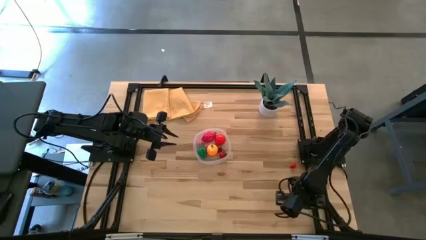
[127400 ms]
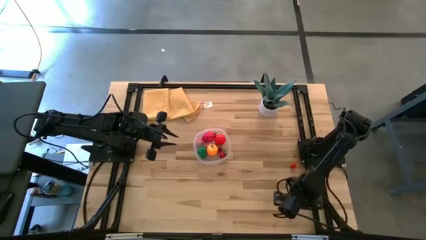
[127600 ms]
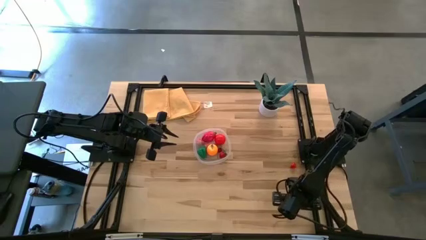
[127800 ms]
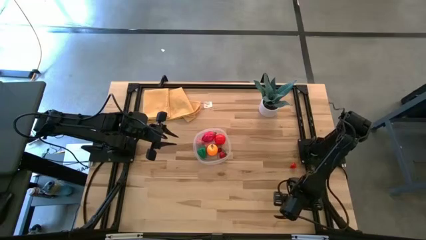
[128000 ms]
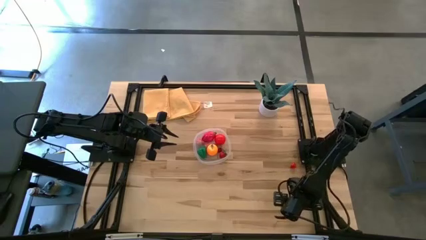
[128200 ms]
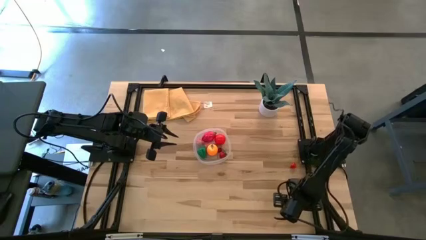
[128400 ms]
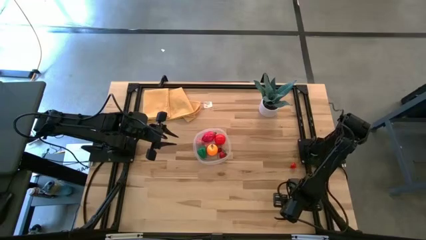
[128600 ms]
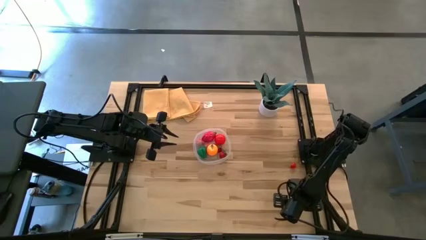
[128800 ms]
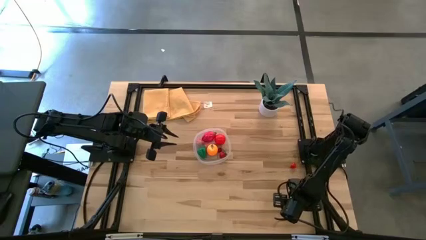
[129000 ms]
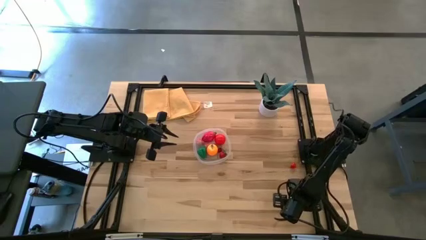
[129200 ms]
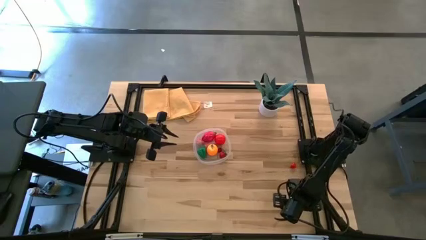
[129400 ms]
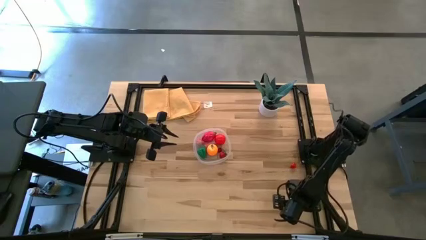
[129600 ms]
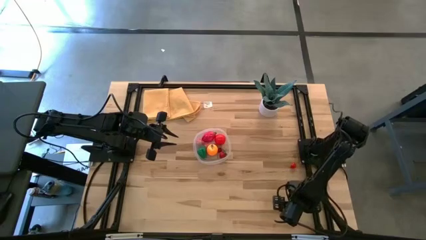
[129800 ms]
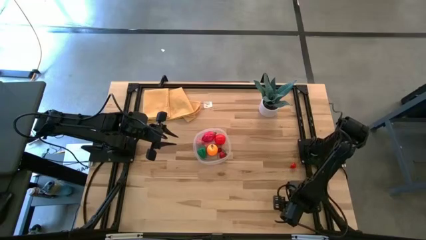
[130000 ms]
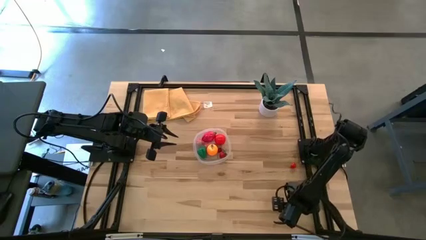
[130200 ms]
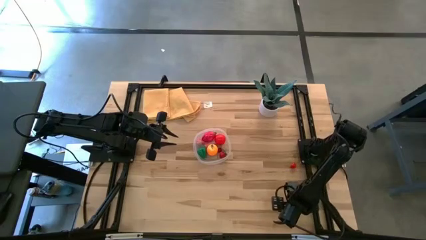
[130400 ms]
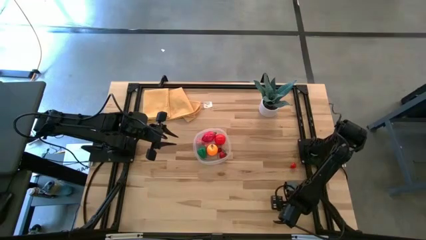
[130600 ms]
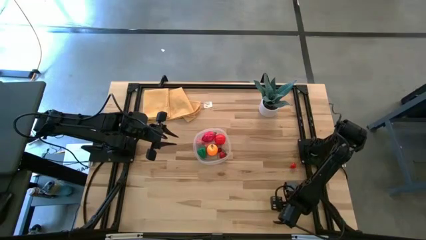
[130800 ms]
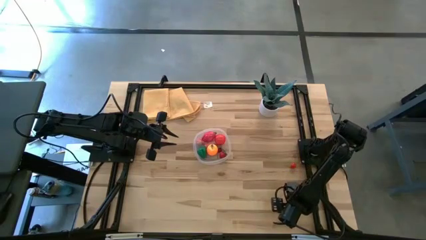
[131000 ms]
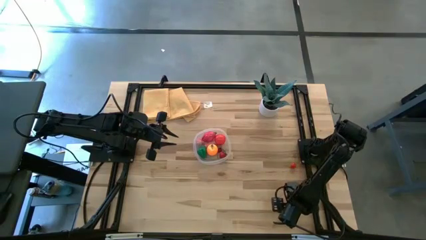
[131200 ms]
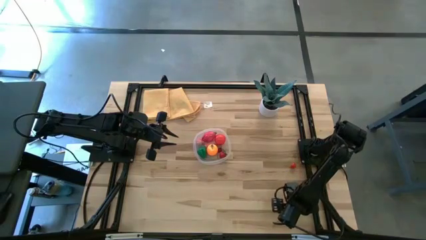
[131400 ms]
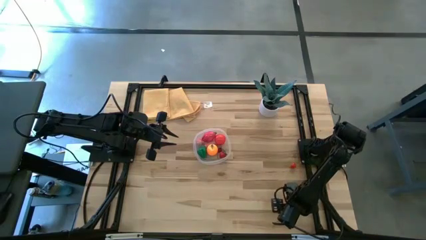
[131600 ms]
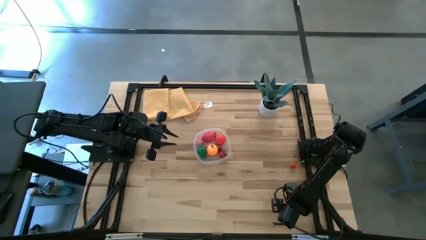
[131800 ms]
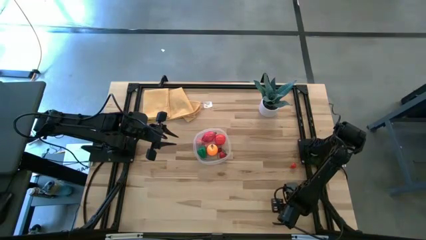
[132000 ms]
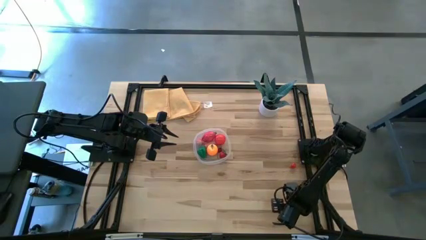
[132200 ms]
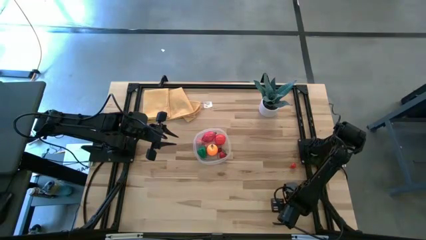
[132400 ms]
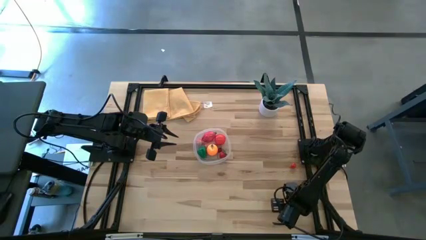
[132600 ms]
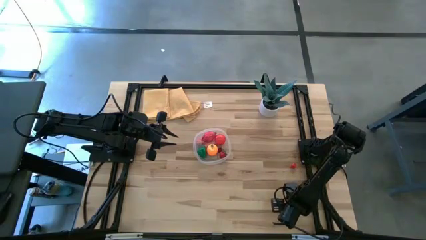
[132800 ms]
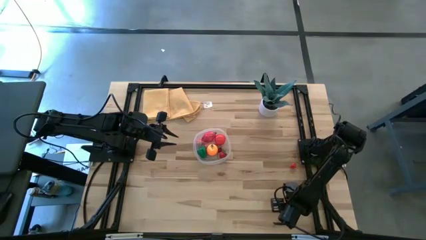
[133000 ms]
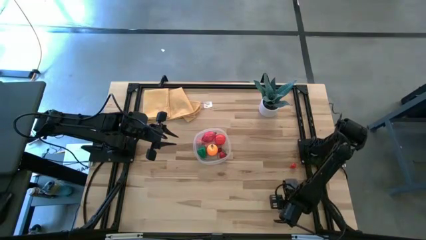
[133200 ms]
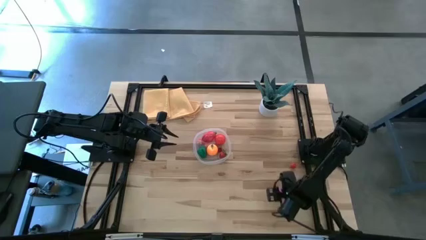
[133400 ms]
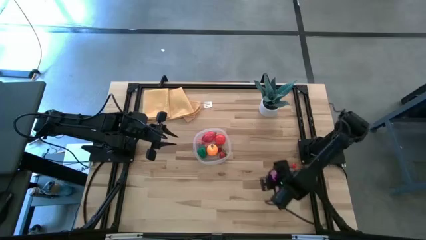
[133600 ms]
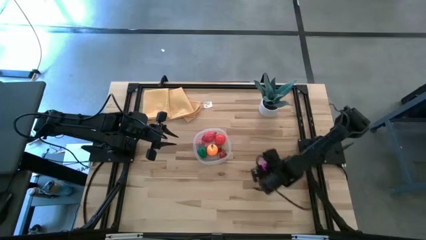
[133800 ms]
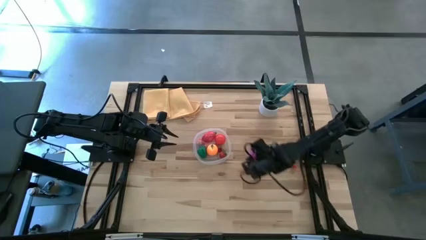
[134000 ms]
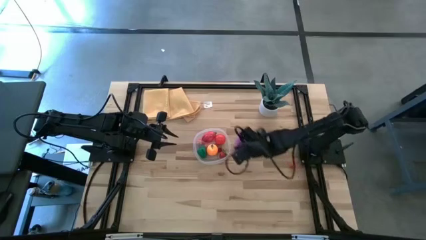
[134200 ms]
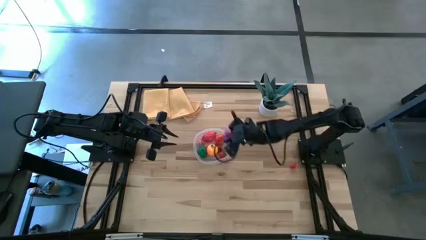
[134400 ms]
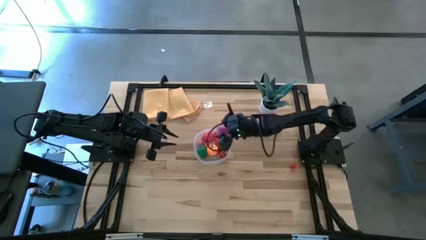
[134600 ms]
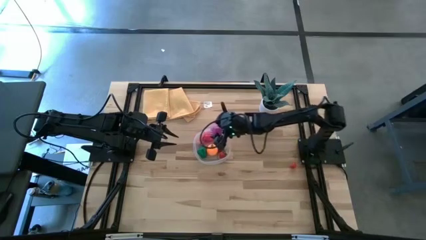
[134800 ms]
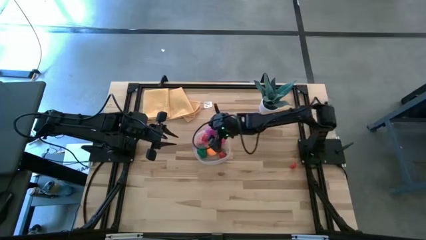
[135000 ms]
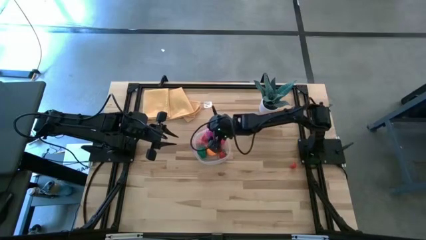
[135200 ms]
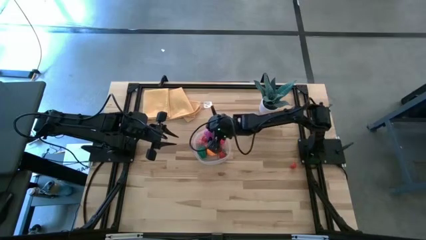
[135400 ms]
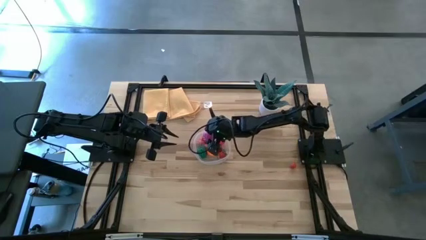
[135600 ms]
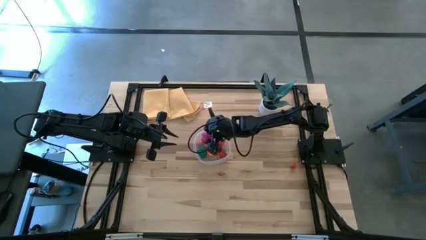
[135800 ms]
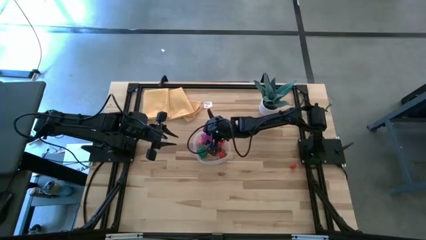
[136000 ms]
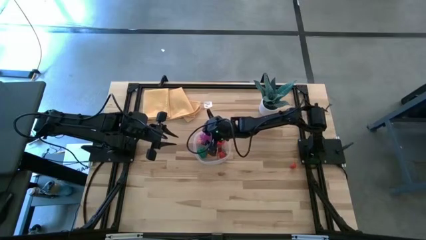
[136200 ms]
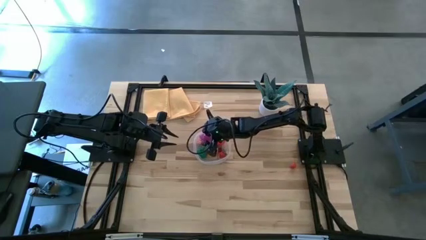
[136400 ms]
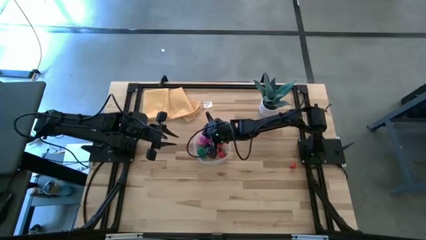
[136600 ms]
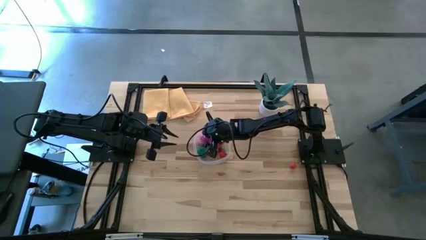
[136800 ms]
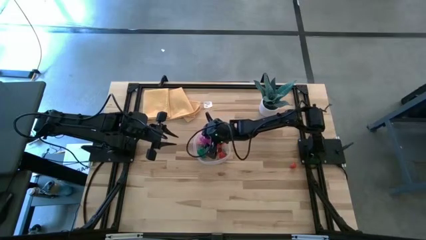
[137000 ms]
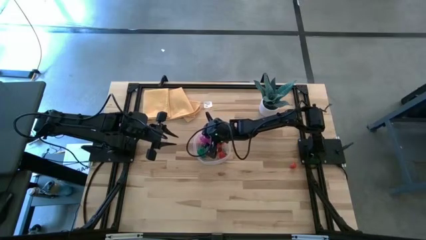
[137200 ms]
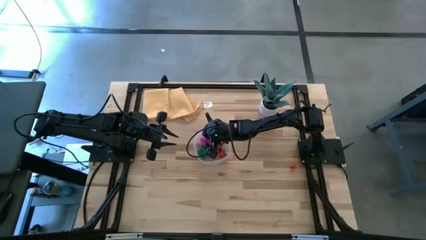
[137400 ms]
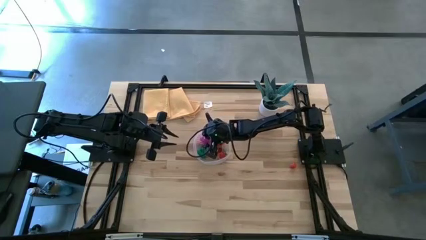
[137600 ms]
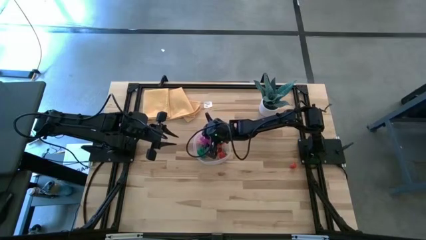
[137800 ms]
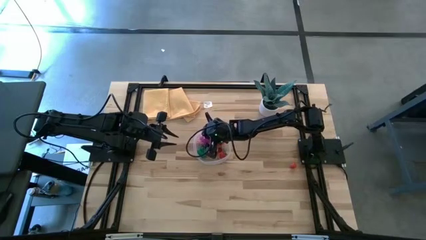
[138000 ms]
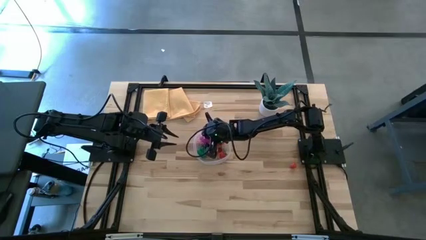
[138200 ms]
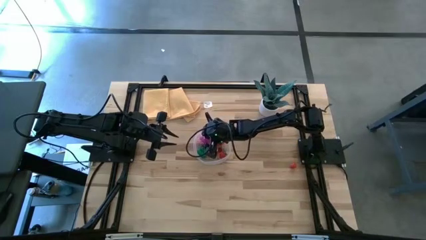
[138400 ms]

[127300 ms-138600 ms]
Task: Pick and placing Produce into tupperware
Put the purple onion into the transparent bin

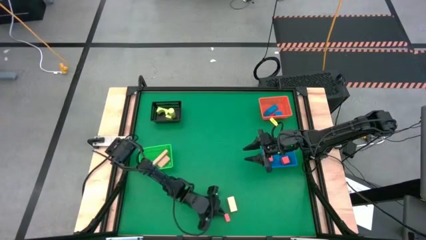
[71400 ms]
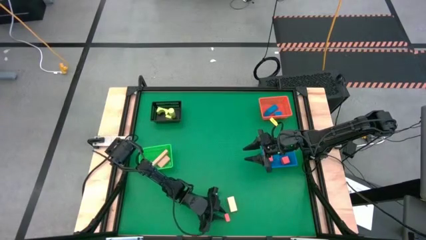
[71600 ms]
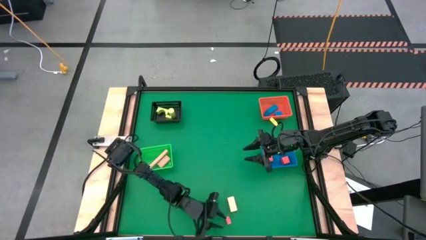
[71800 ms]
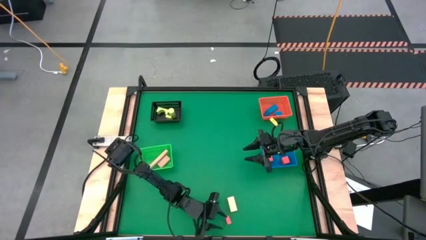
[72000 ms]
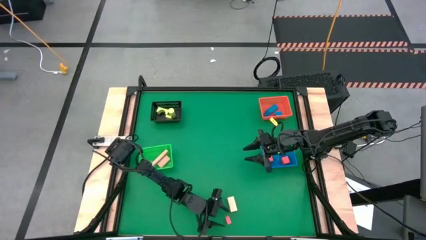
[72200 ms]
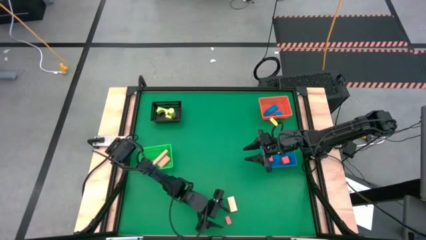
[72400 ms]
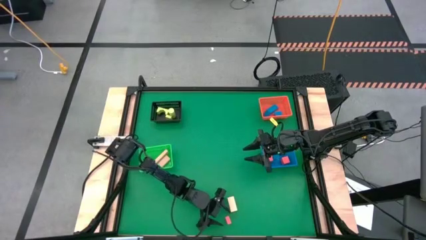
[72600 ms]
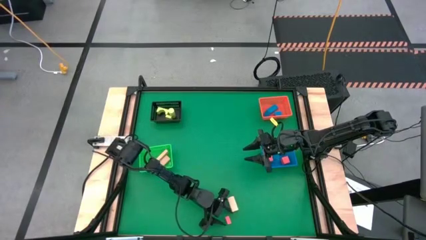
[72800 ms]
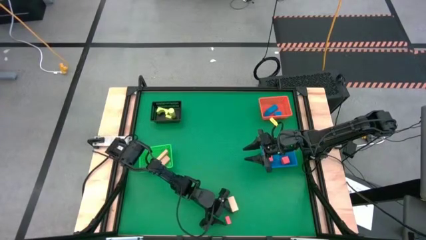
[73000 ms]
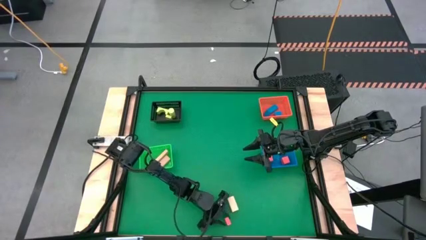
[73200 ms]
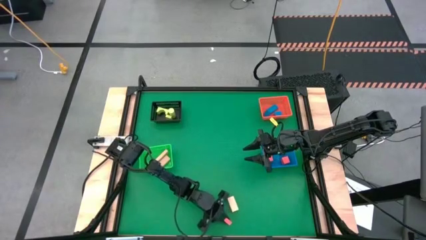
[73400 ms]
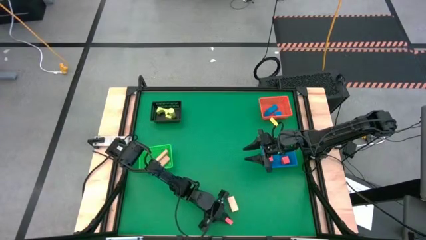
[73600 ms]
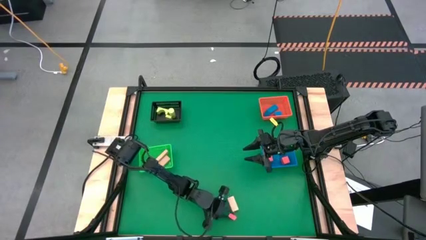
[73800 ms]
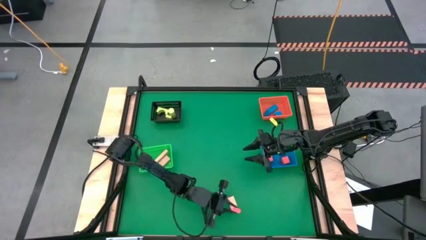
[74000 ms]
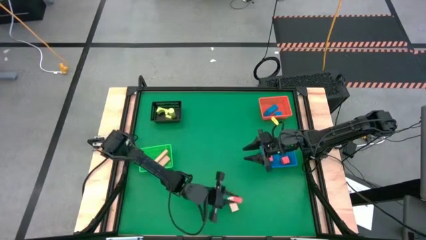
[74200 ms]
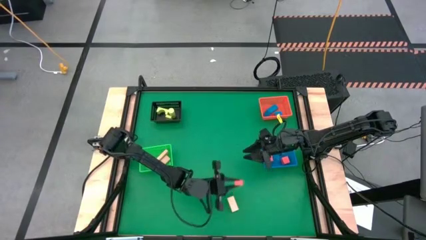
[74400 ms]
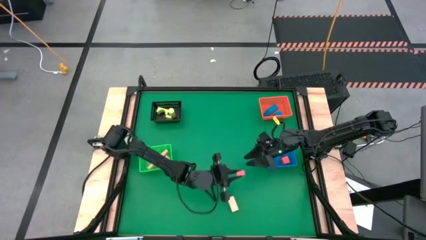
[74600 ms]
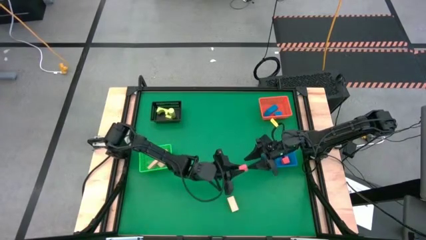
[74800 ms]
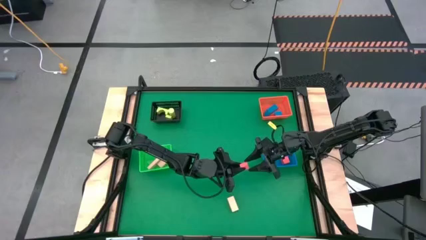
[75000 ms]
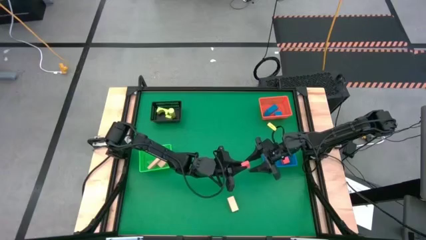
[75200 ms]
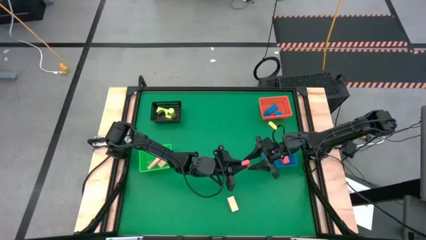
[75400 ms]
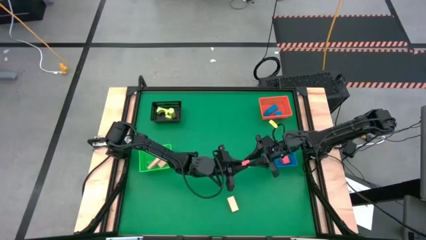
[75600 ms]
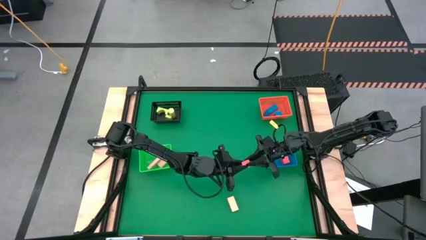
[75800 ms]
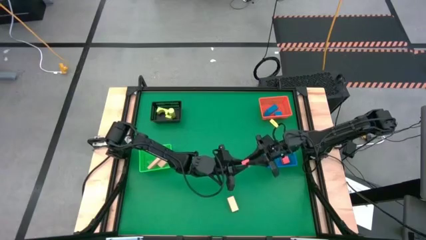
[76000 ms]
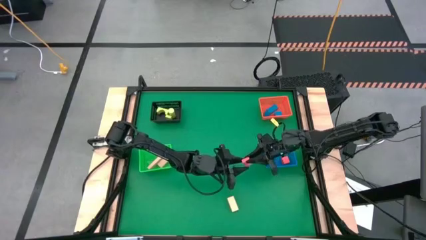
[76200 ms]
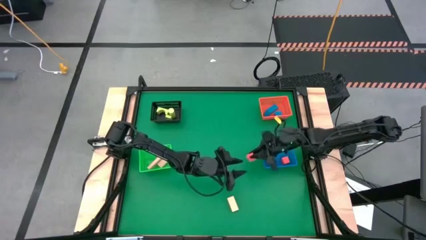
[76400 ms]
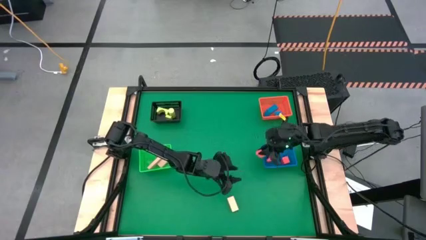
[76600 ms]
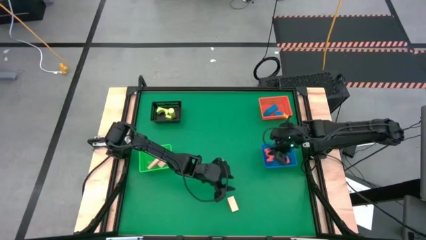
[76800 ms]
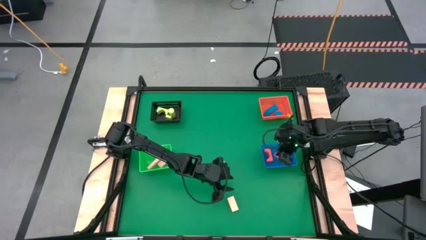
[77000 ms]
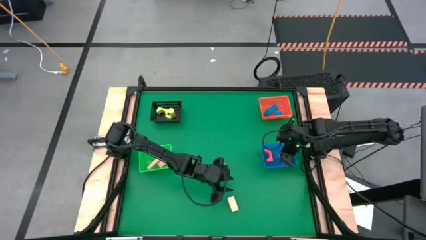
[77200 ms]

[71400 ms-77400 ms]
Task: Sort & place blocks by color
Put the orange block into the blue bin

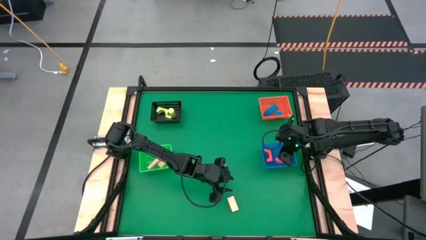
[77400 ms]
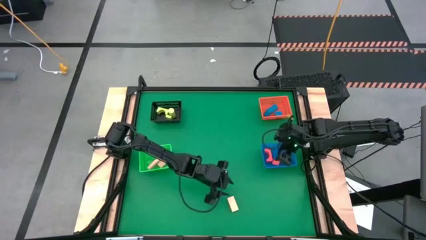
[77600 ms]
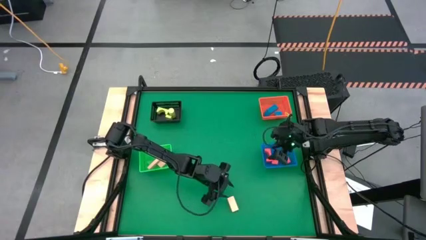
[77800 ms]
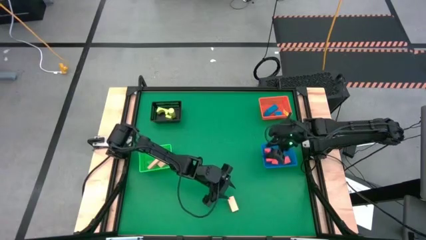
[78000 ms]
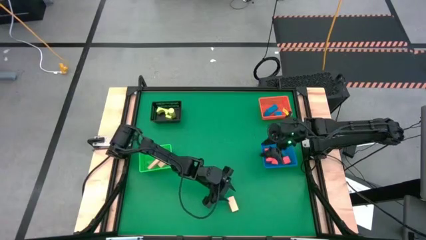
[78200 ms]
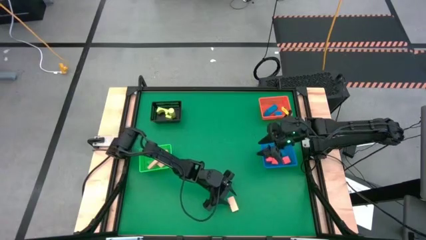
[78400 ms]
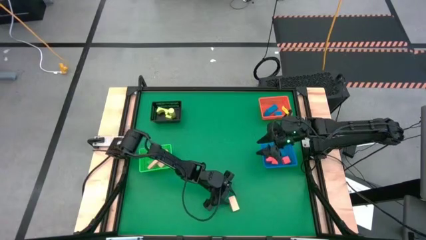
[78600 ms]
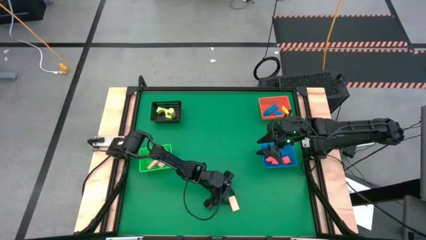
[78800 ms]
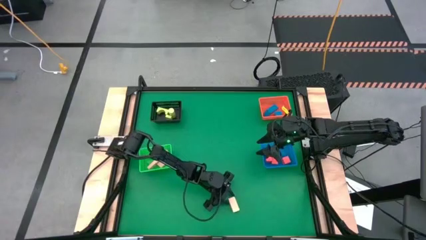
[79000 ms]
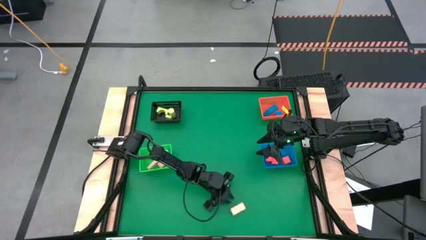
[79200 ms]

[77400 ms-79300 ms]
Put the light brown block into the green bin
